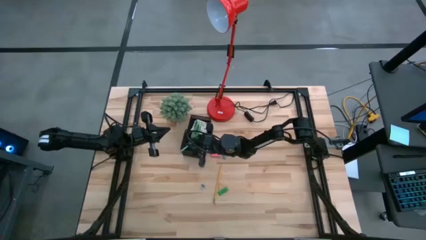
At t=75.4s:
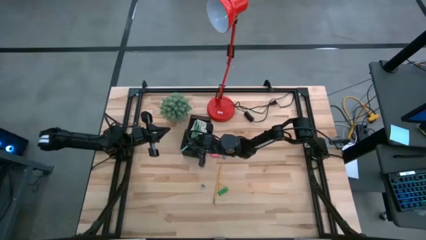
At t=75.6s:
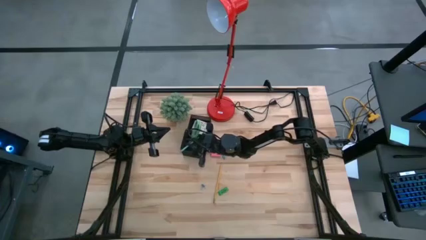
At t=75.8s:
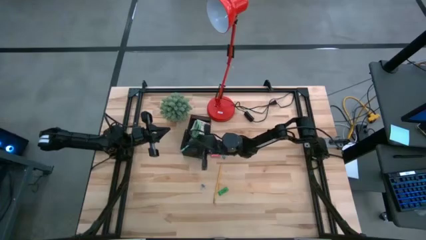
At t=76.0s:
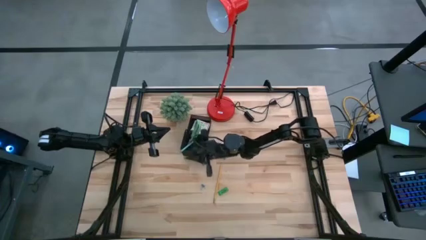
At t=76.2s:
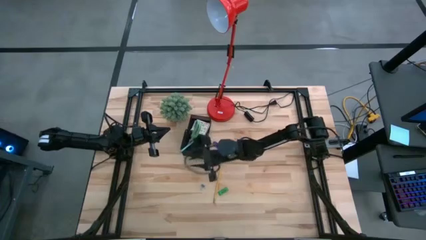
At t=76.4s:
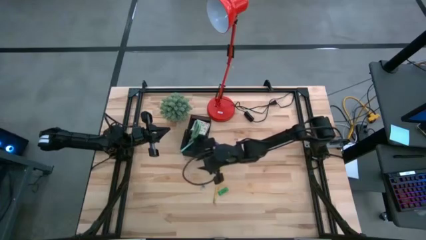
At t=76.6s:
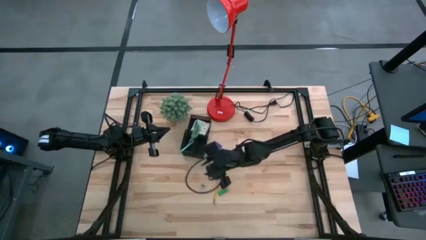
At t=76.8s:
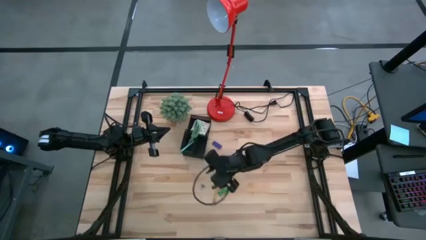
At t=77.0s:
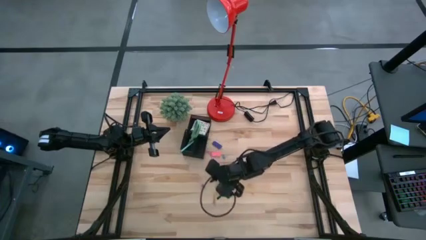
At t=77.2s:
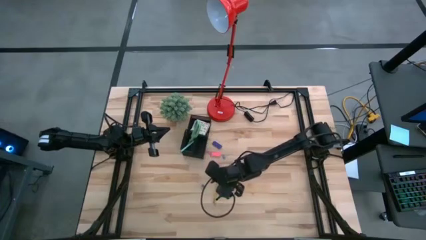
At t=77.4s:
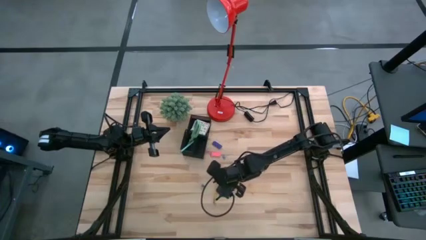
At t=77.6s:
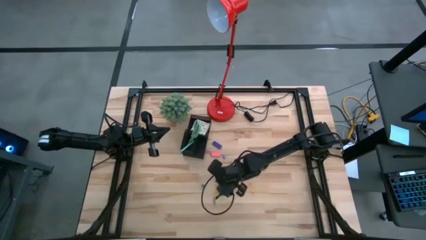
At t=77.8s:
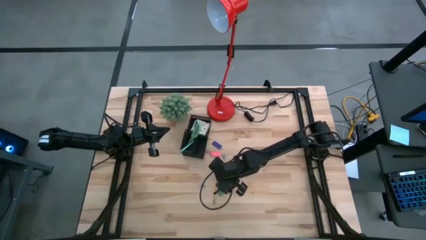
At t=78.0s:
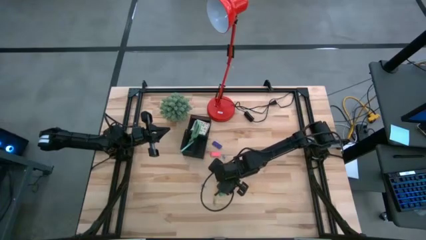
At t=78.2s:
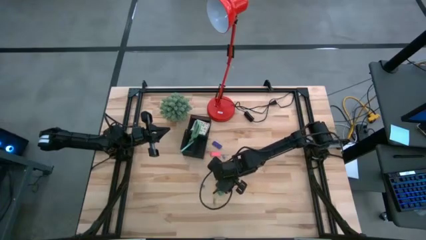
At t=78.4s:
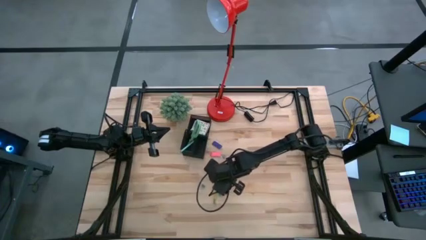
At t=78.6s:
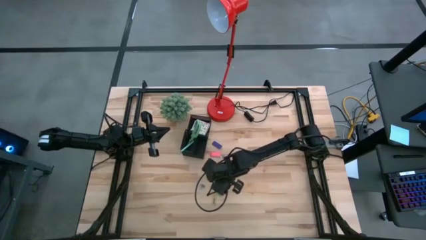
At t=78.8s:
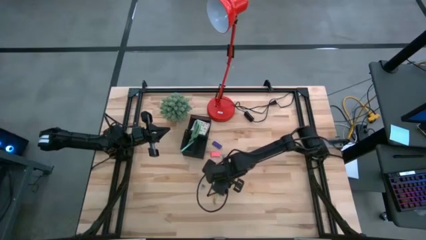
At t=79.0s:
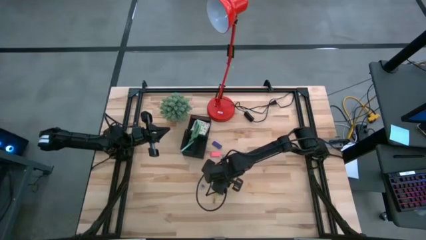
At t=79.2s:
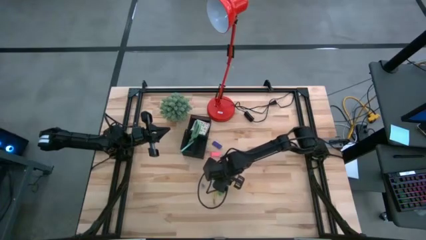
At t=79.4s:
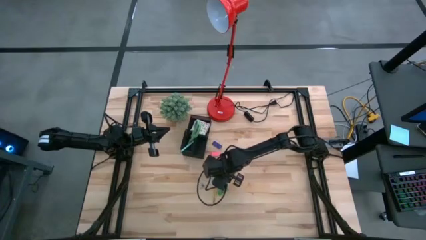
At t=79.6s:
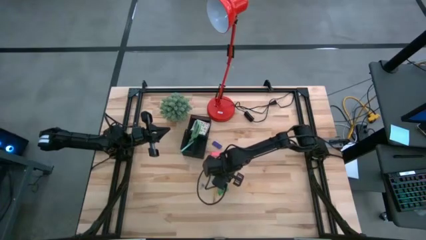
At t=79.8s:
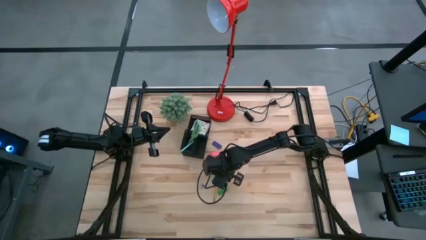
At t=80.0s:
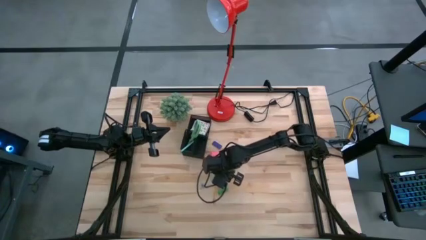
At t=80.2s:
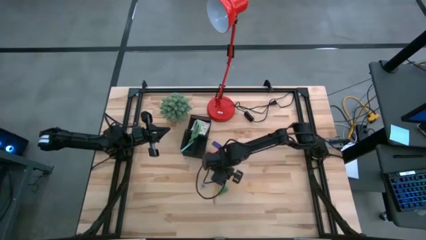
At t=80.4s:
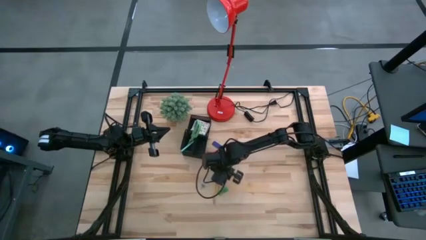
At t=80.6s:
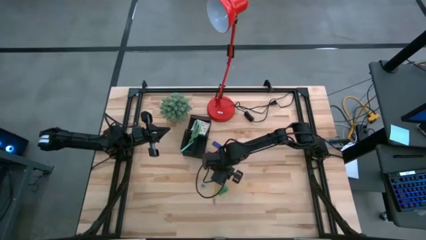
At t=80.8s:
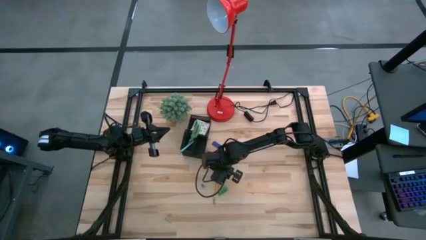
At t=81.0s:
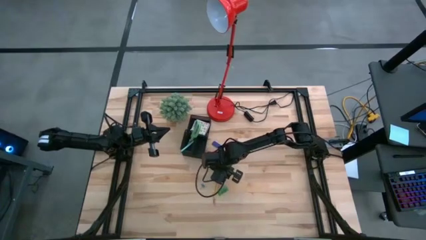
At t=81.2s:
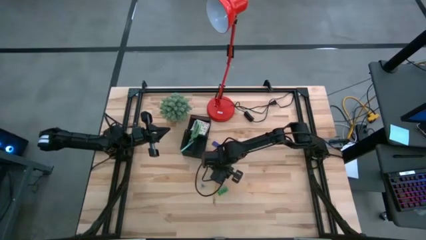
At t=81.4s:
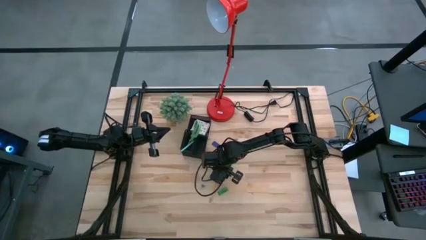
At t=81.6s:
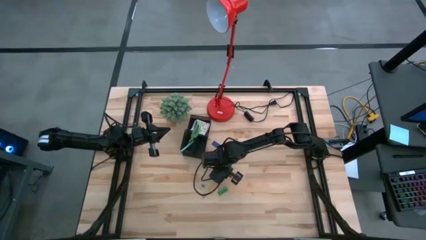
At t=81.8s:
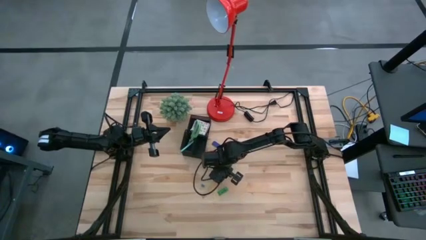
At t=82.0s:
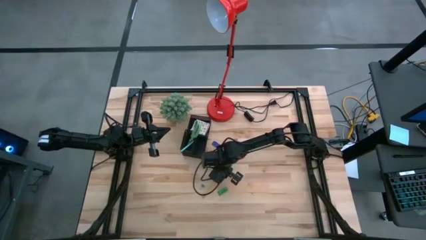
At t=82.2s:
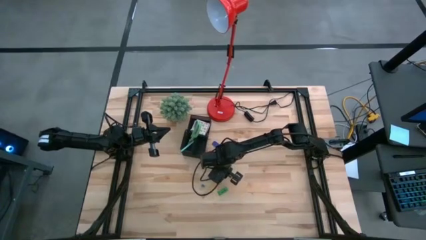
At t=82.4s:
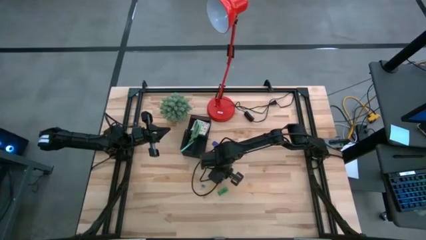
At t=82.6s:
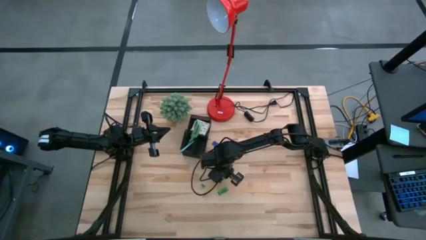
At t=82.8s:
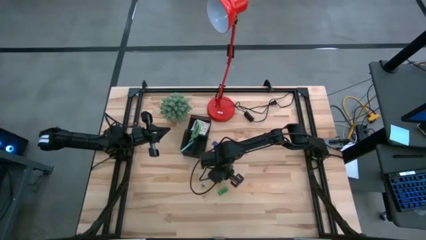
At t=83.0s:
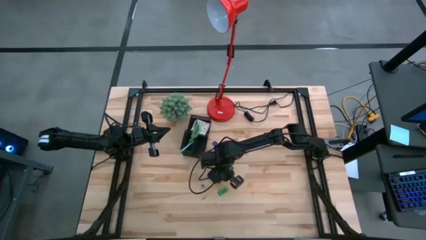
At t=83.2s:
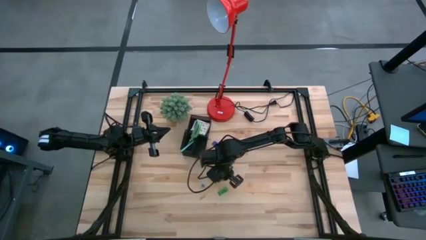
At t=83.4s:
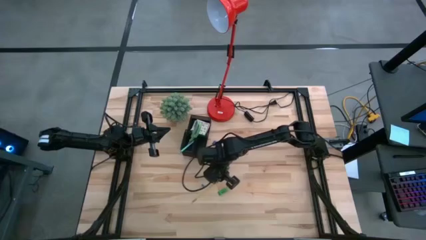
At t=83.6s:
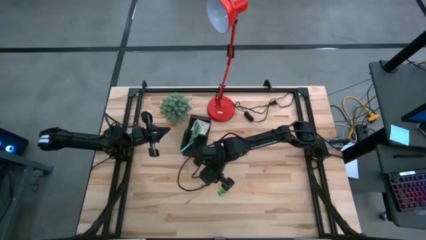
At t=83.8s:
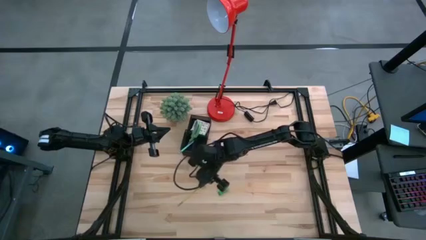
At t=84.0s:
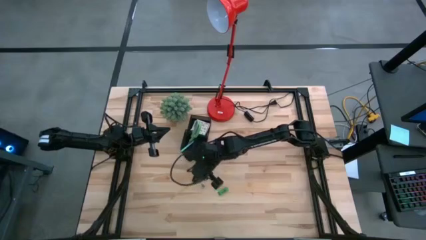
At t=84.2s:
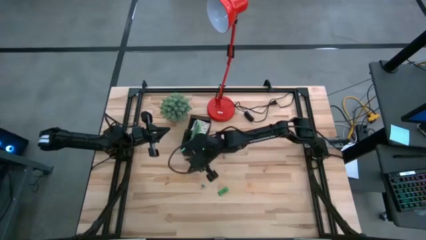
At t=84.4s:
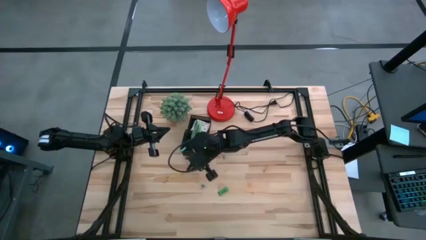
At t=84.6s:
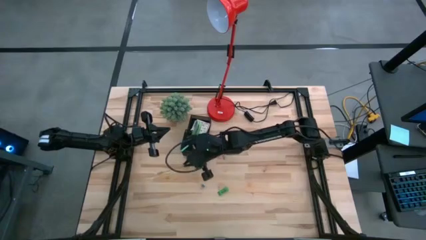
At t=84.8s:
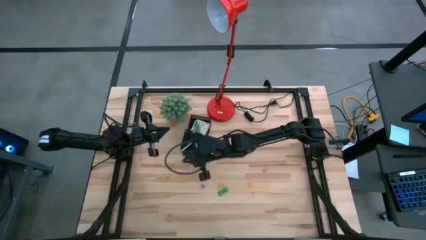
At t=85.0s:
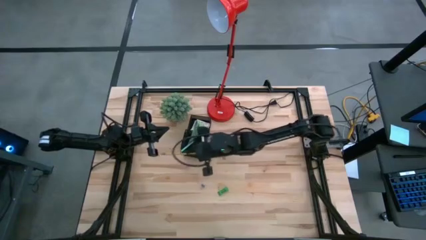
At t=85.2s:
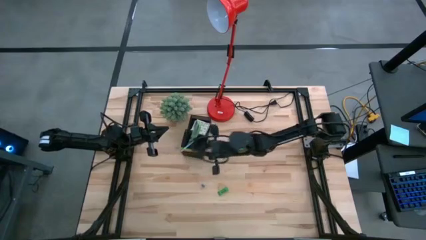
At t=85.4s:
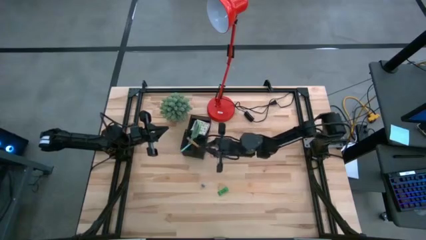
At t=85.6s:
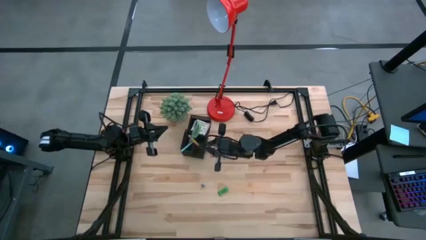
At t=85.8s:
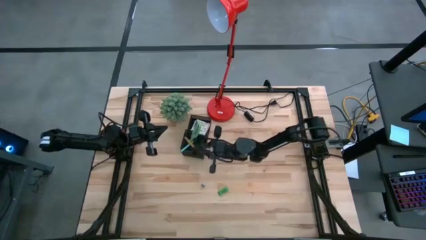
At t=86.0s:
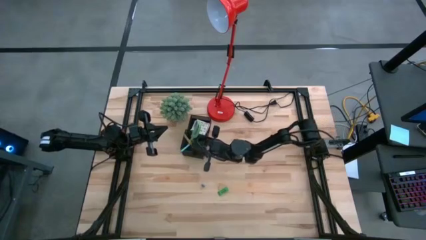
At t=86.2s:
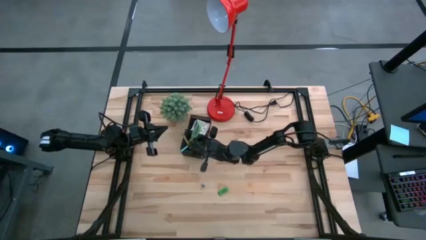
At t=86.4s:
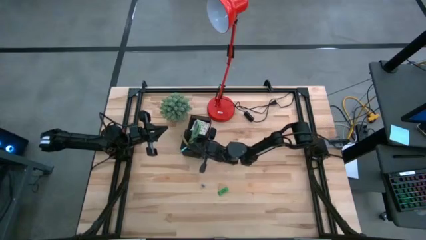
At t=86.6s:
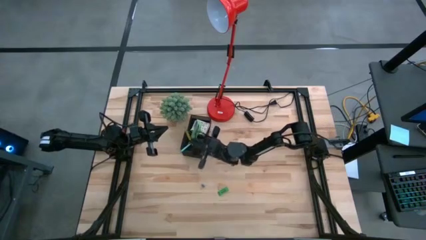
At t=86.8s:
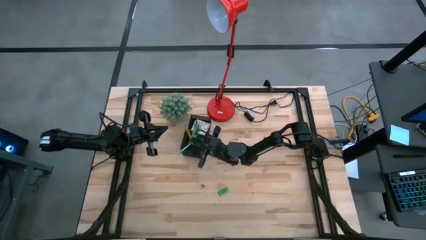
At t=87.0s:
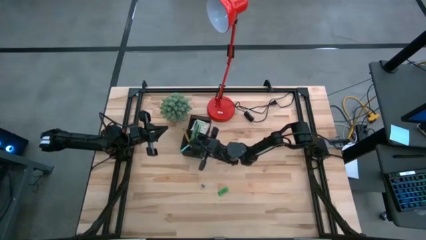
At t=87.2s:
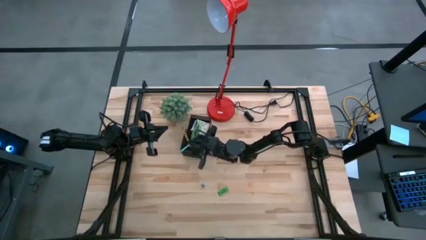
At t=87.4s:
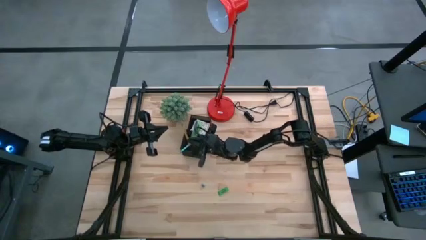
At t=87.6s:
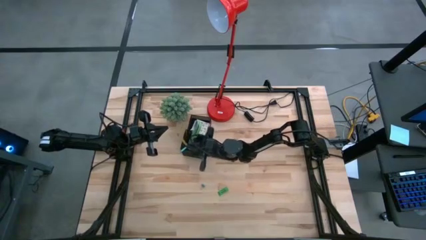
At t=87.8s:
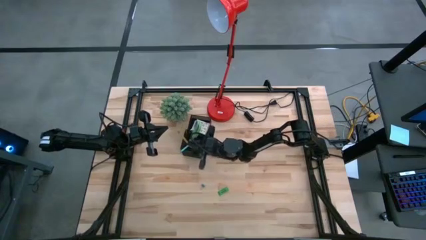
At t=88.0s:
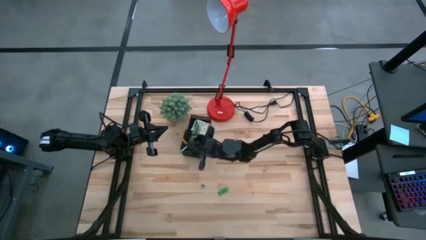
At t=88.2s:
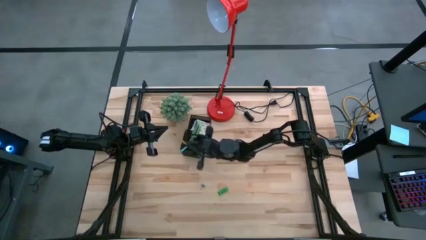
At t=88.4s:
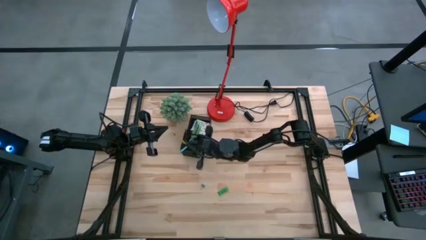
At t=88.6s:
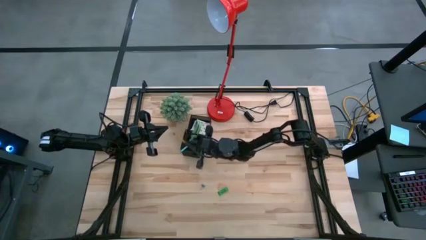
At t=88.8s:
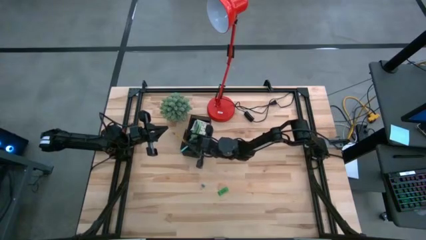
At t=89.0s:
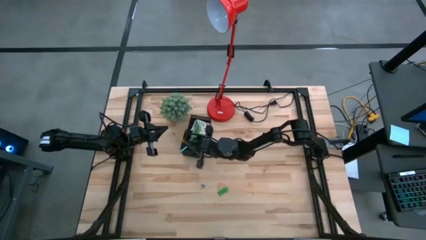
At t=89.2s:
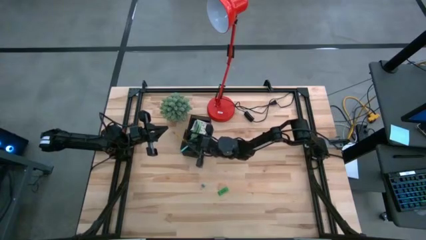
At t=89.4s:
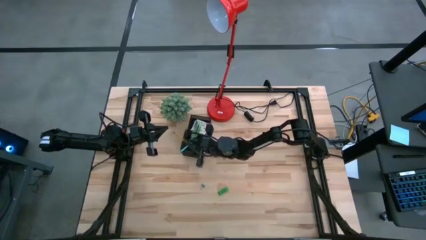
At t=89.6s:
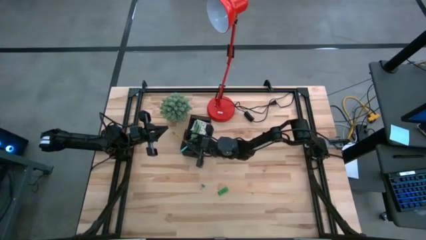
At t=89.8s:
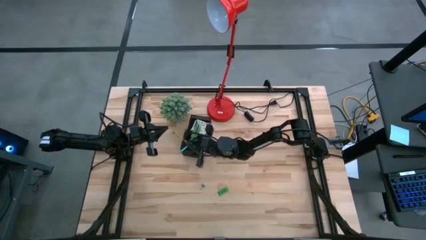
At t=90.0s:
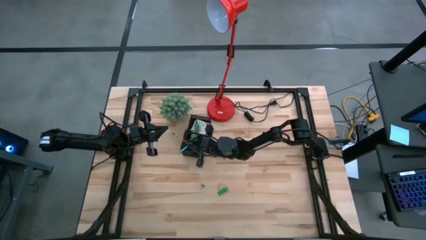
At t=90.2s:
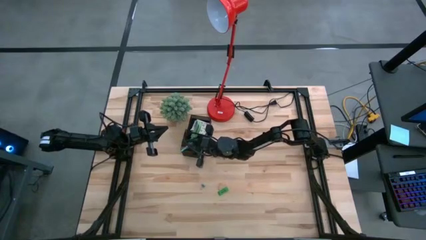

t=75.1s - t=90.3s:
Task: Pick and place office supplies into organizer
Put the yellow pencil in the black desk organizer
